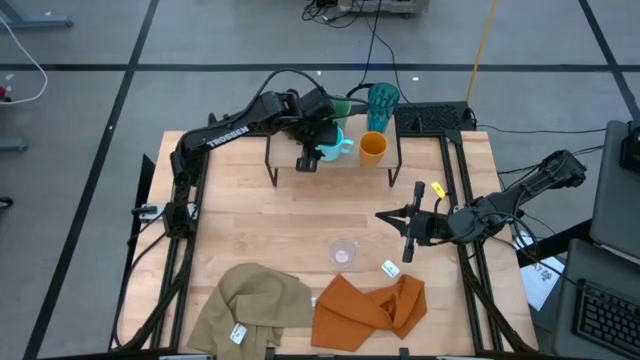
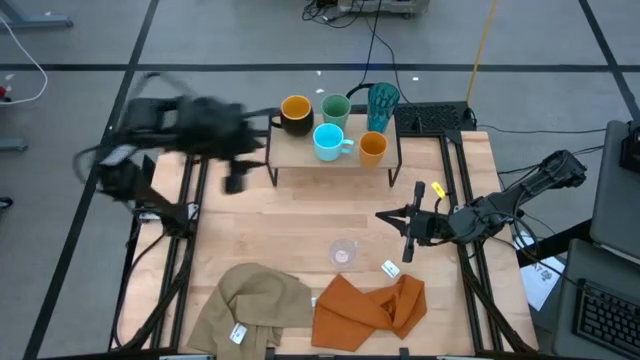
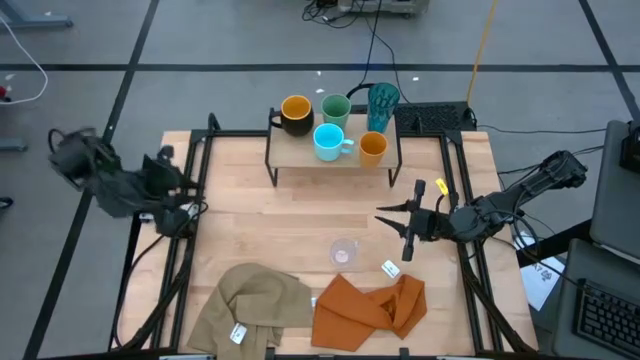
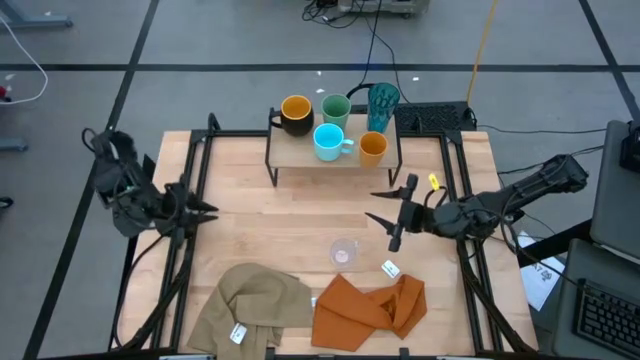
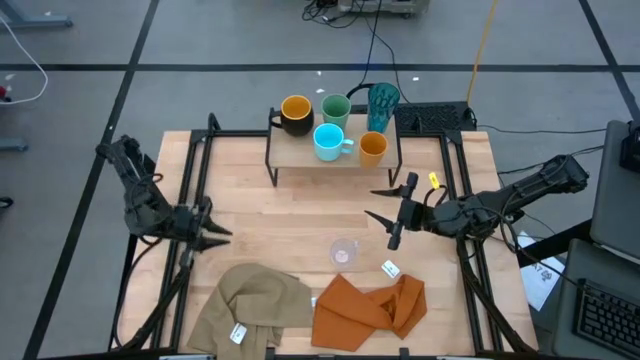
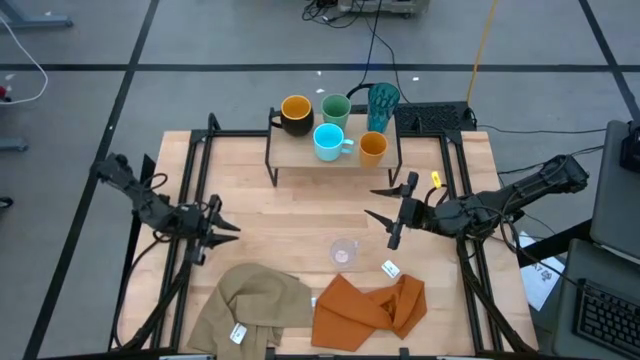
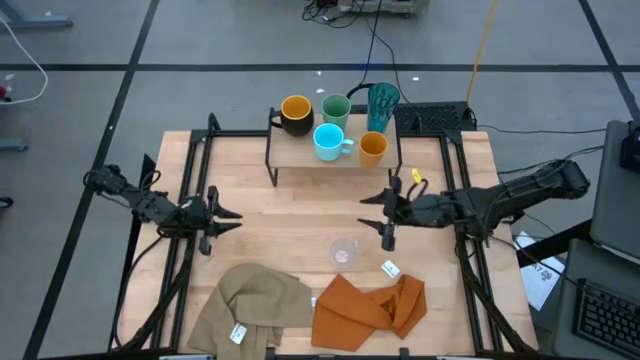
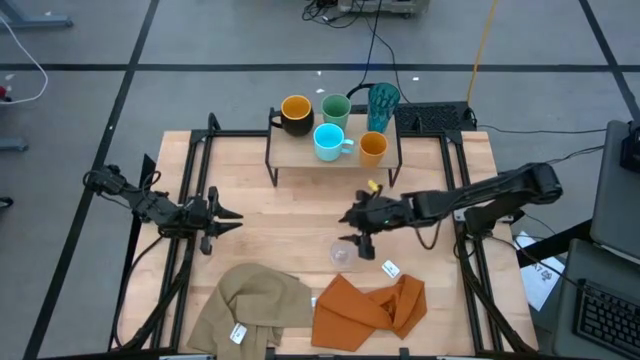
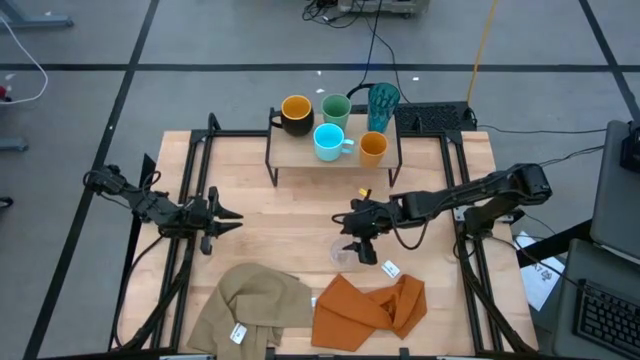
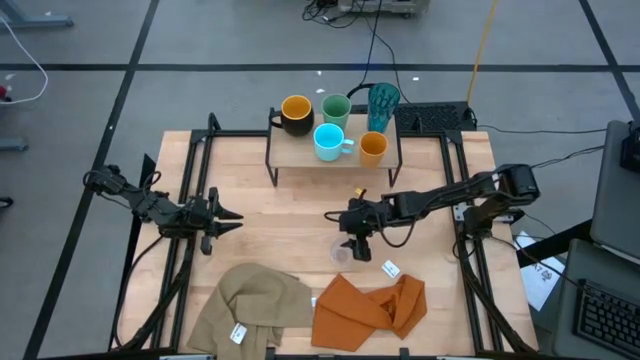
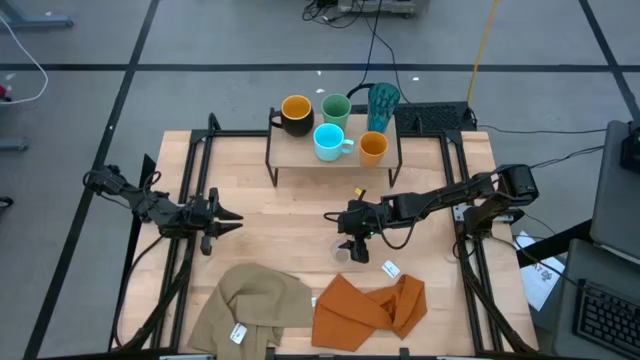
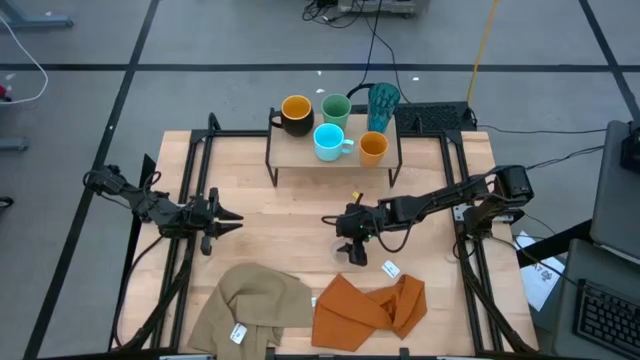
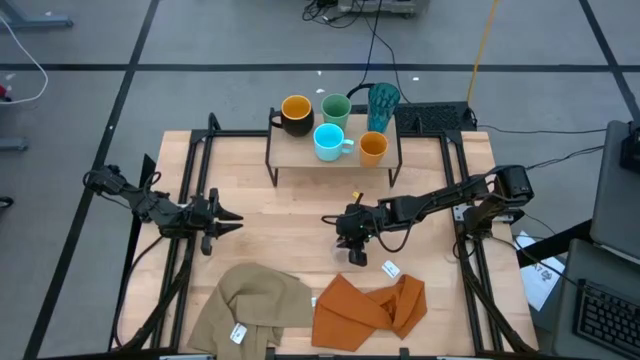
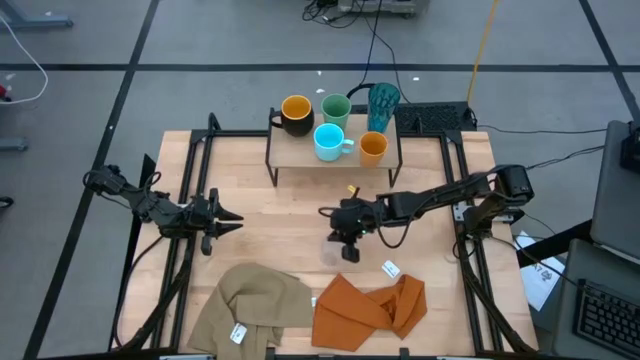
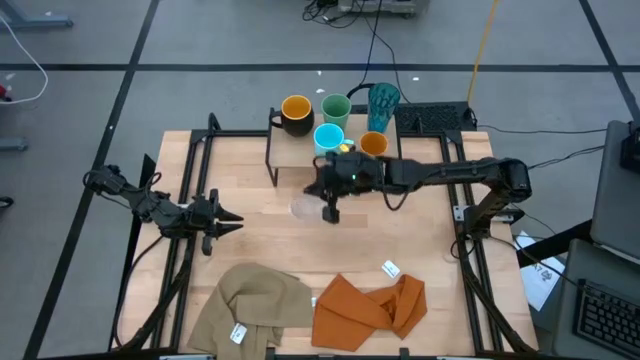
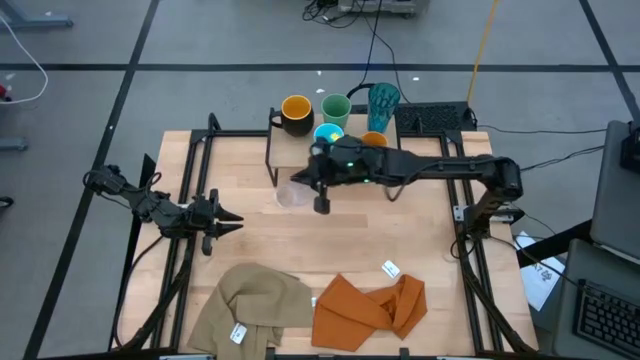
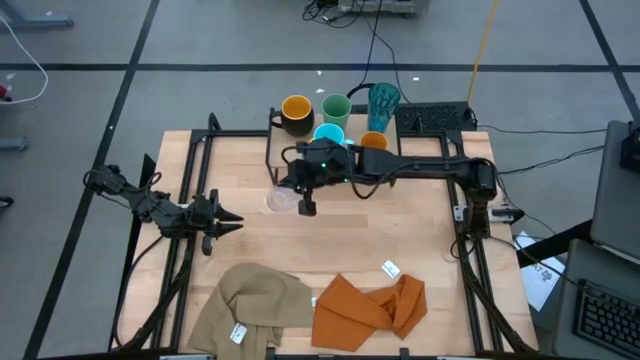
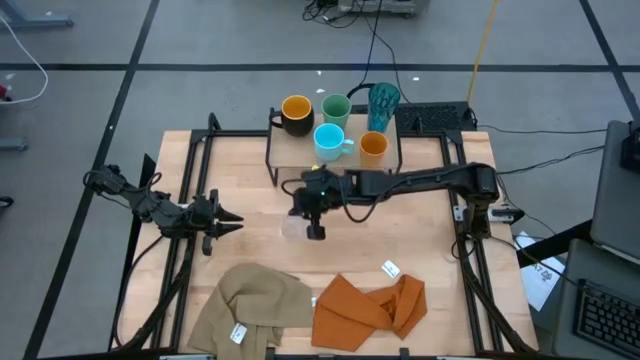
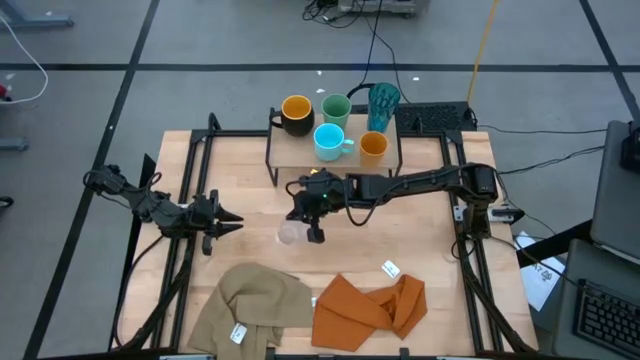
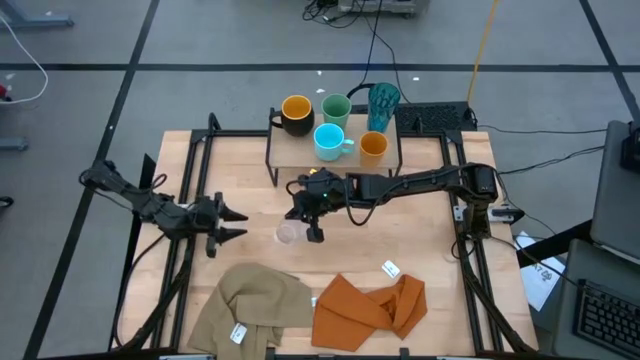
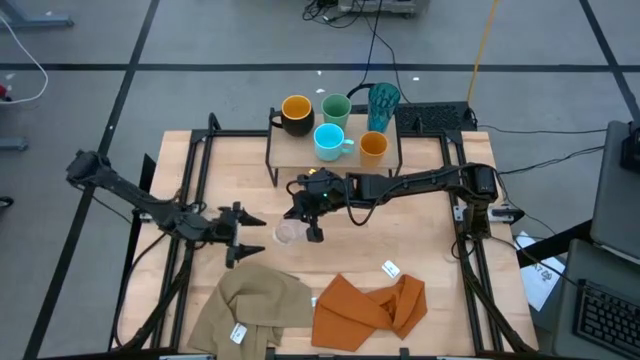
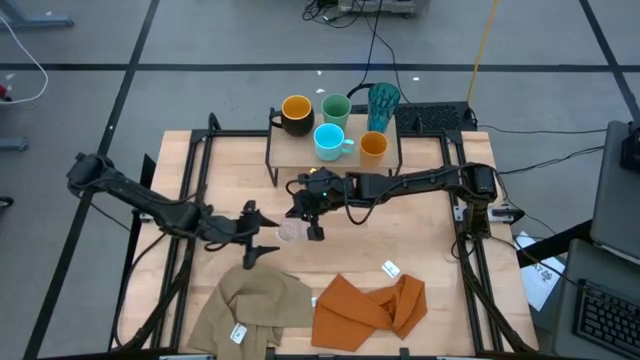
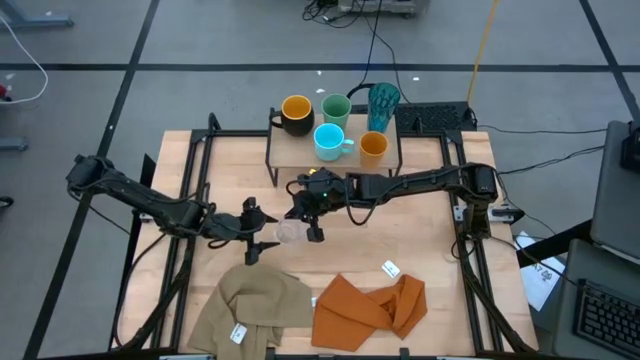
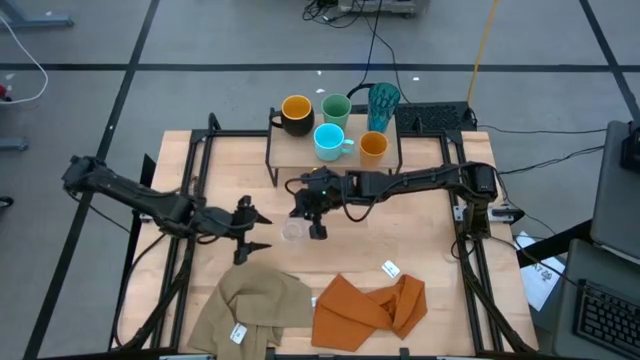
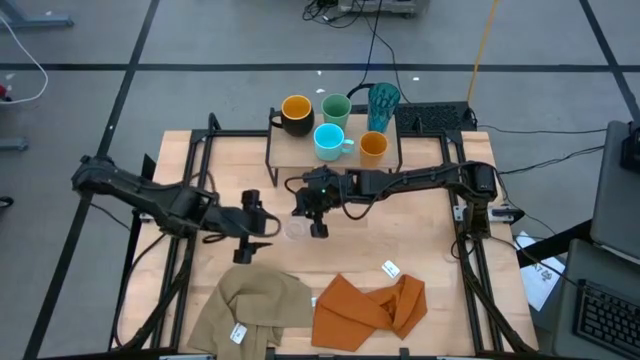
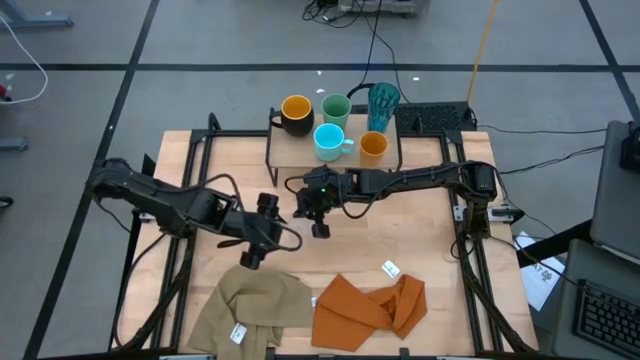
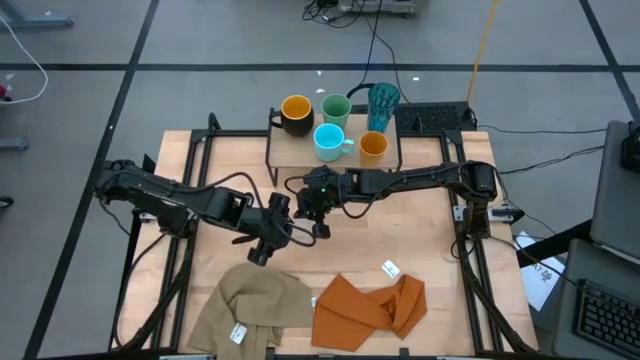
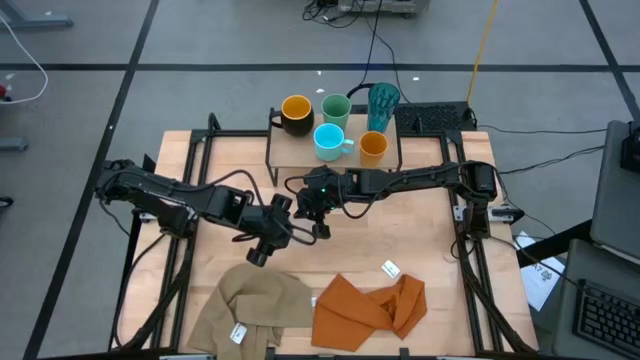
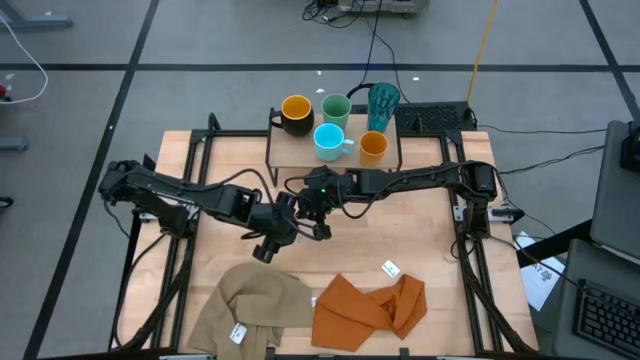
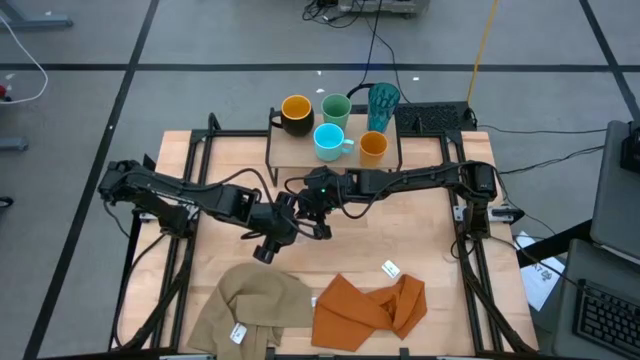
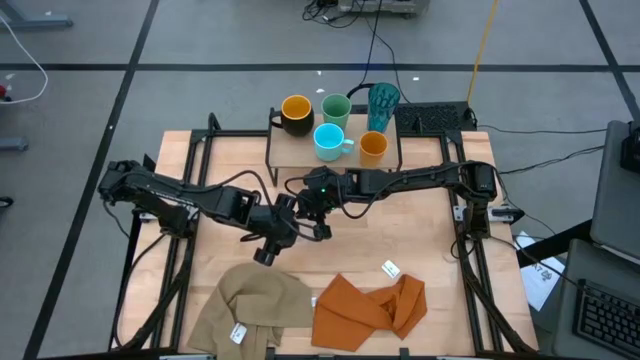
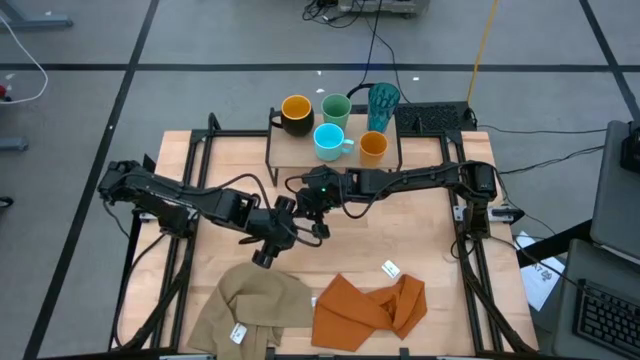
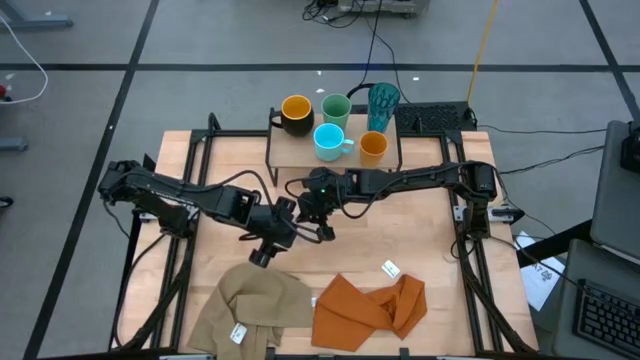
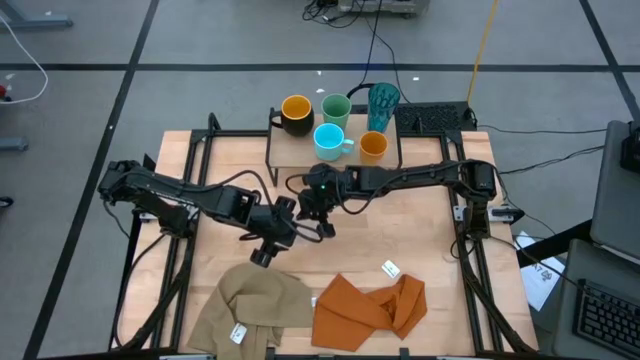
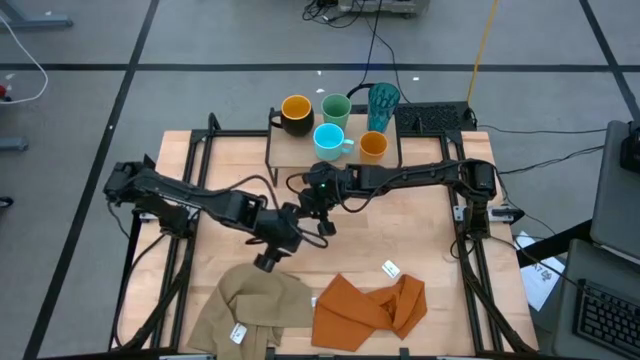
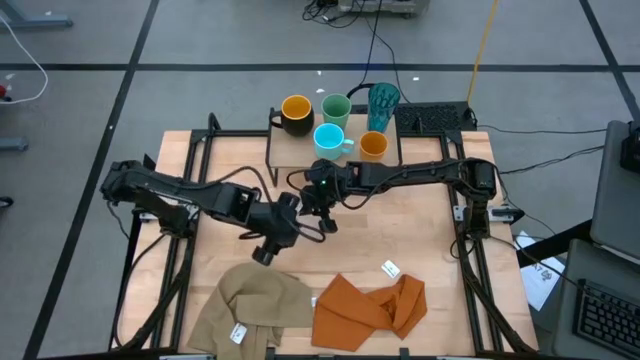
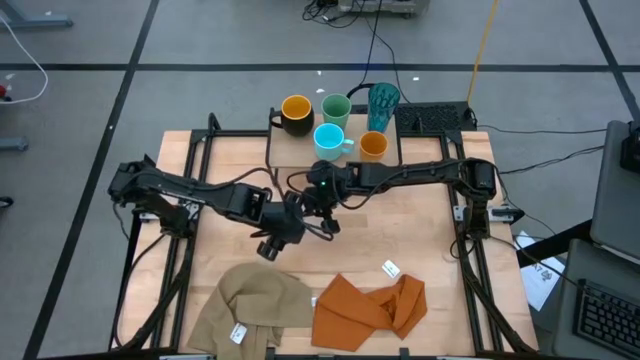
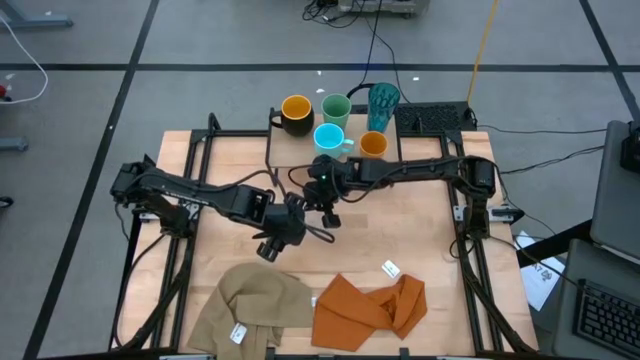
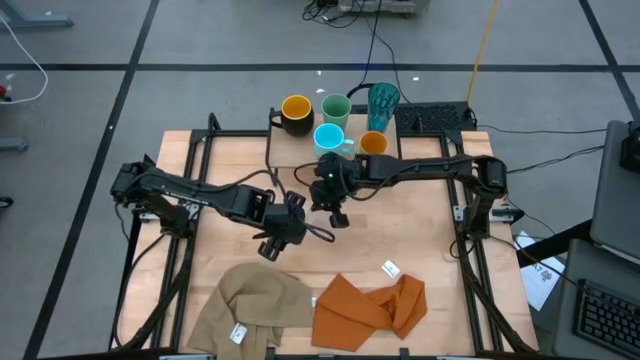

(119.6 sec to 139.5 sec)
Task: Stack small to large cups/mugs on shelf
Put the transparent mug on the shelf

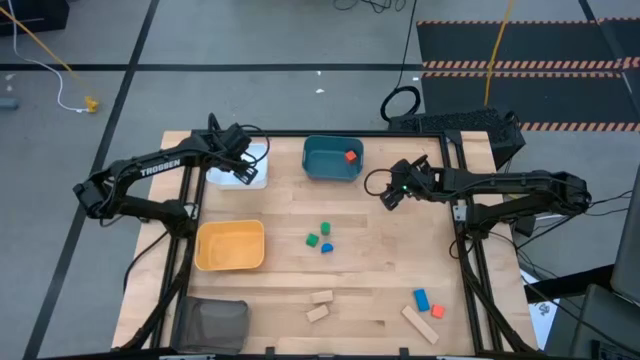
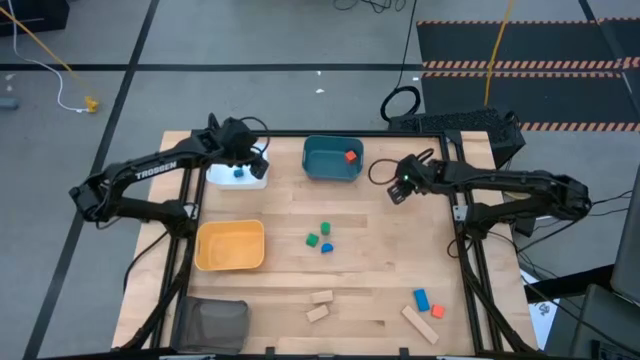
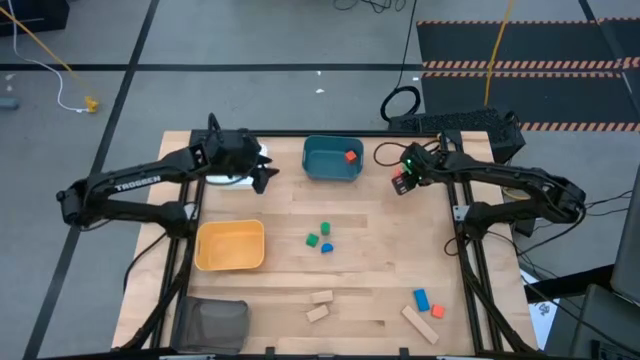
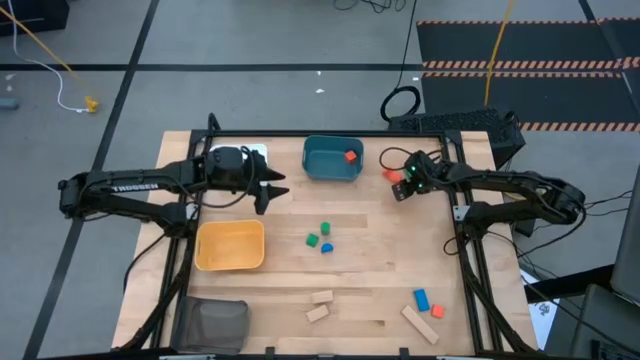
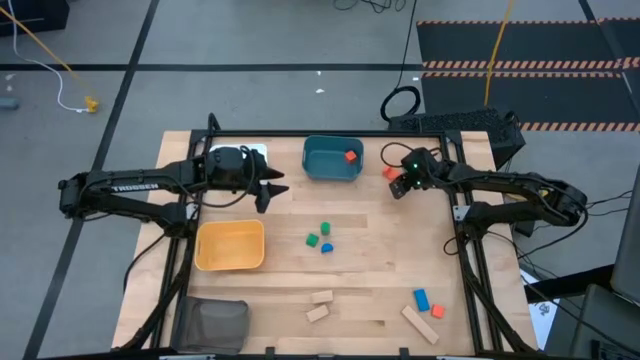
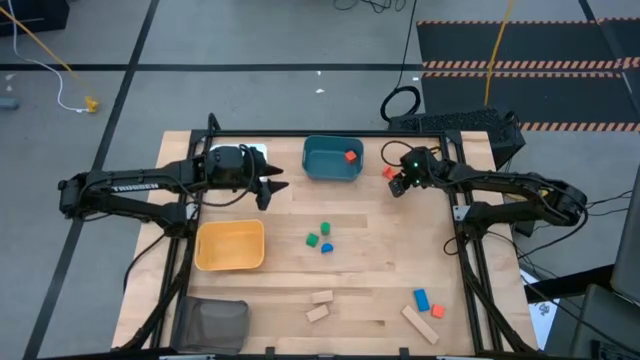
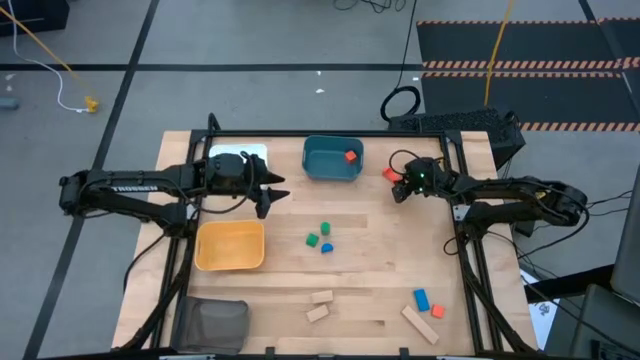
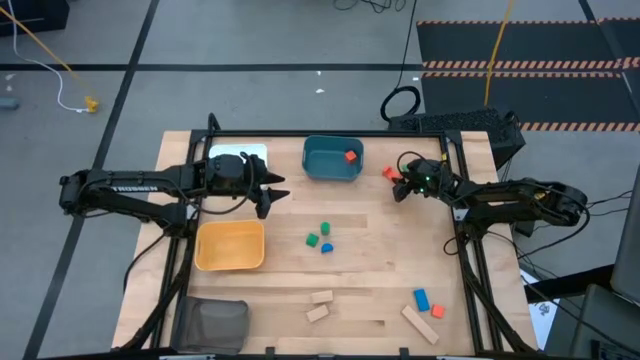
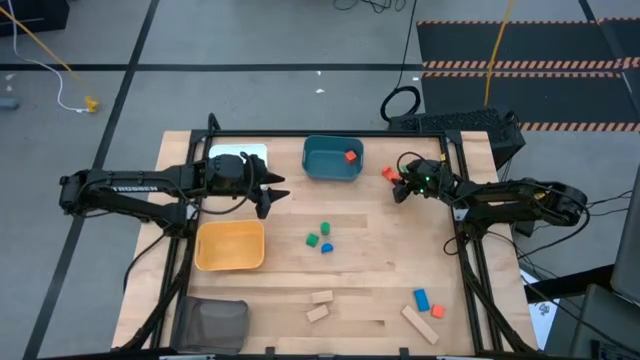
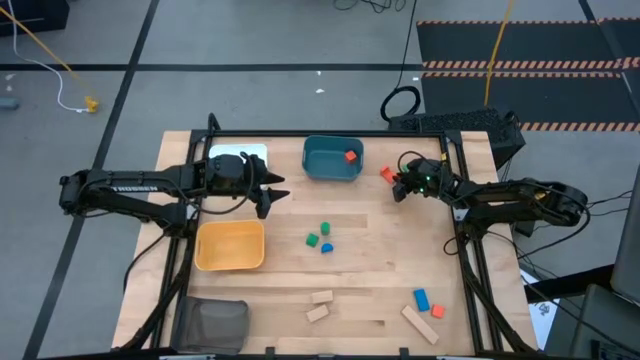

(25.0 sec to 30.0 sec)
Task: Sort & place blocks by color
Put the top orange wooden block into the blue bin
